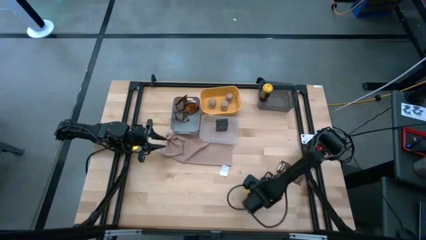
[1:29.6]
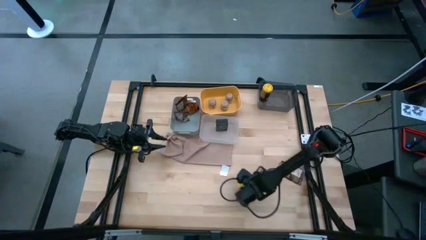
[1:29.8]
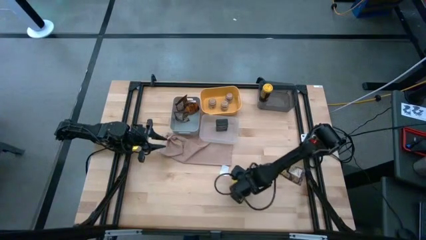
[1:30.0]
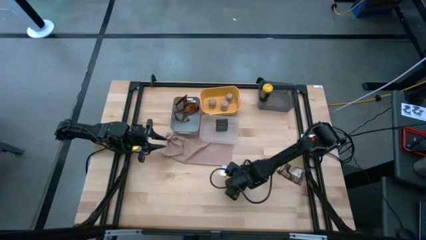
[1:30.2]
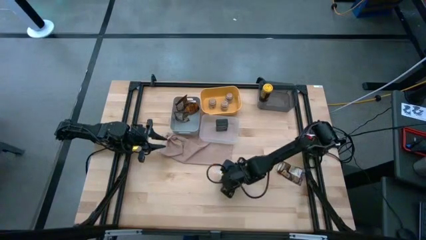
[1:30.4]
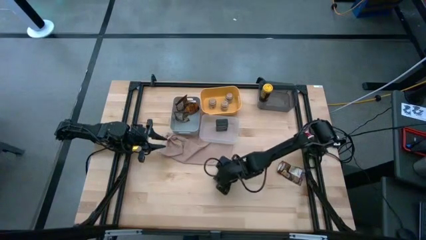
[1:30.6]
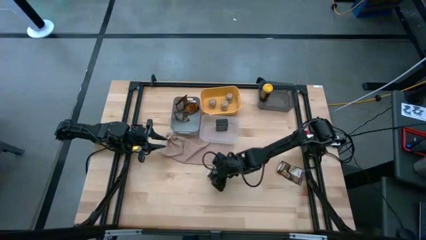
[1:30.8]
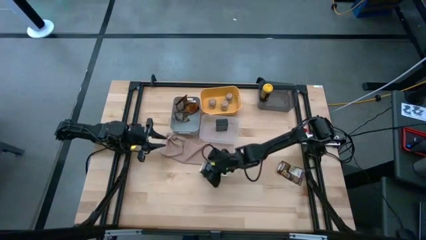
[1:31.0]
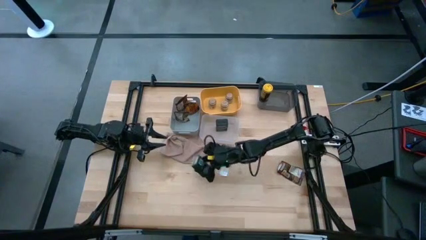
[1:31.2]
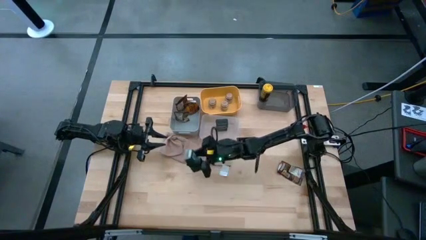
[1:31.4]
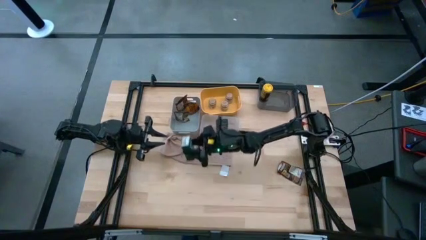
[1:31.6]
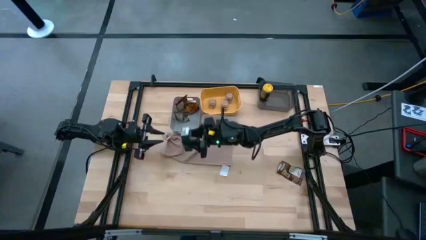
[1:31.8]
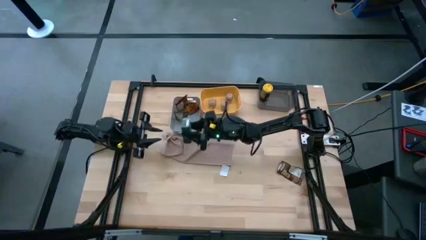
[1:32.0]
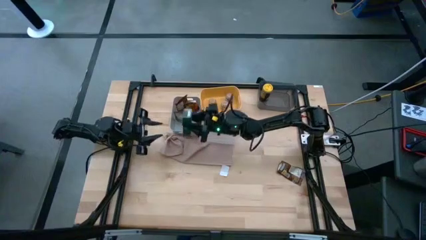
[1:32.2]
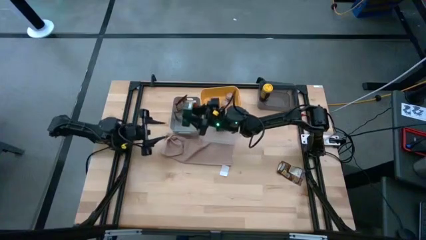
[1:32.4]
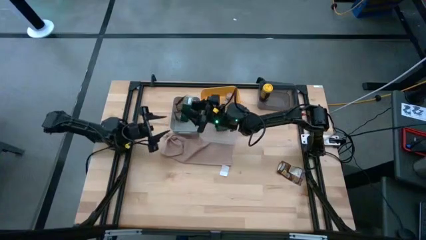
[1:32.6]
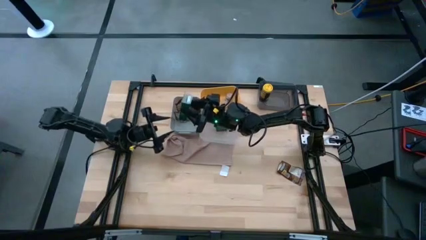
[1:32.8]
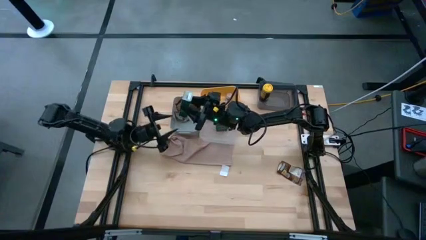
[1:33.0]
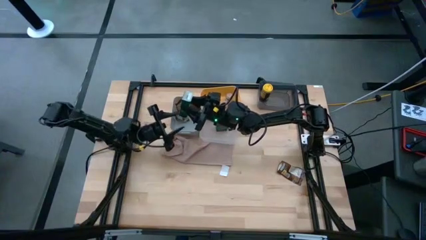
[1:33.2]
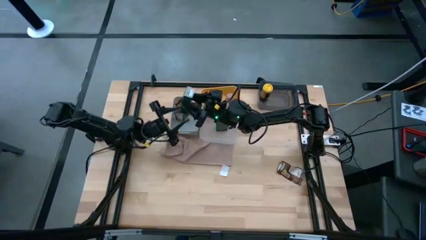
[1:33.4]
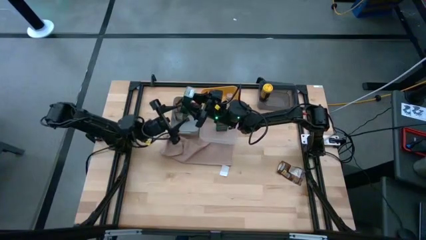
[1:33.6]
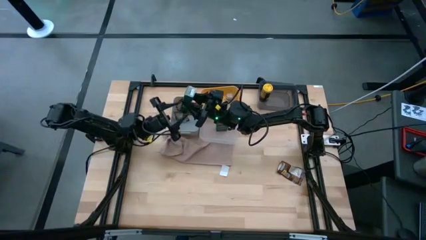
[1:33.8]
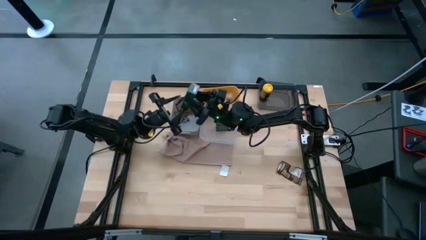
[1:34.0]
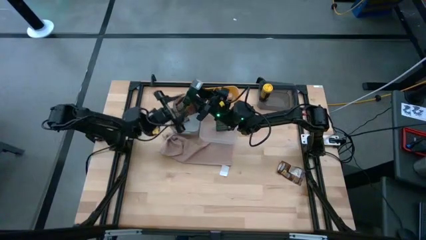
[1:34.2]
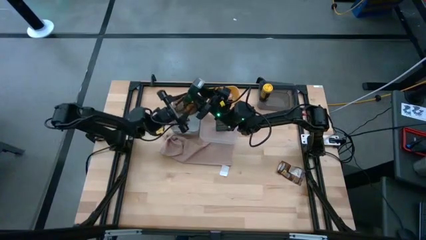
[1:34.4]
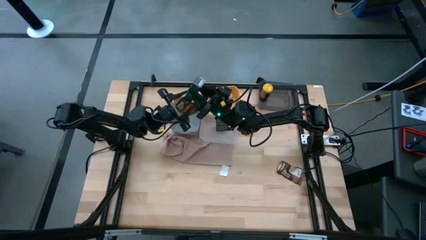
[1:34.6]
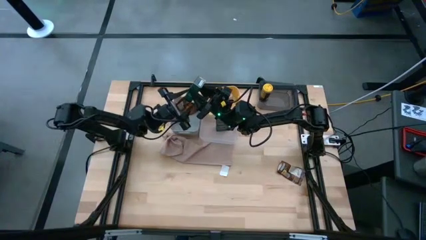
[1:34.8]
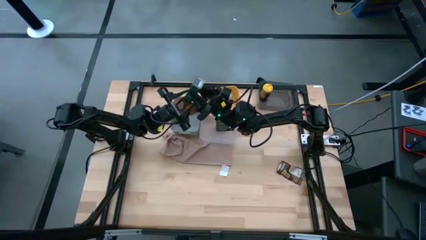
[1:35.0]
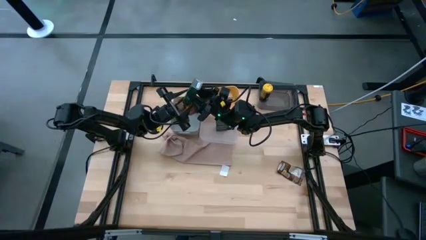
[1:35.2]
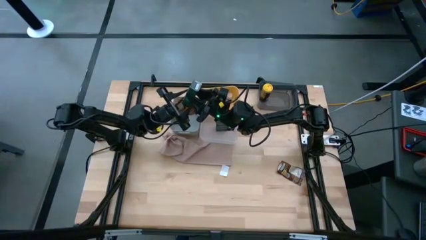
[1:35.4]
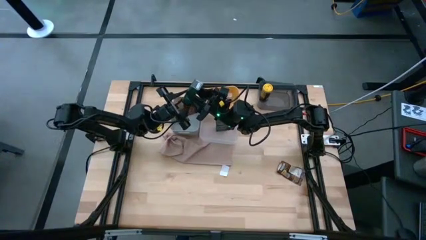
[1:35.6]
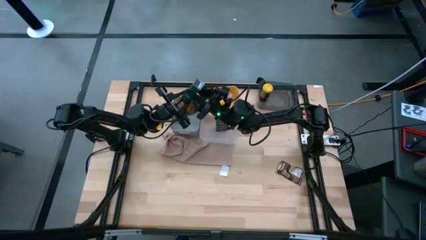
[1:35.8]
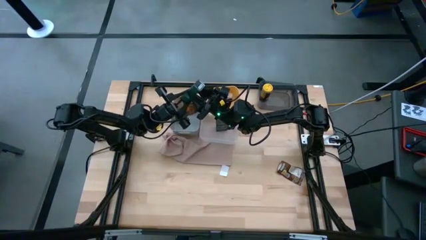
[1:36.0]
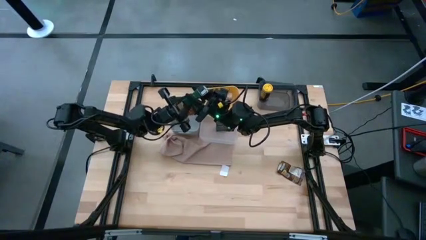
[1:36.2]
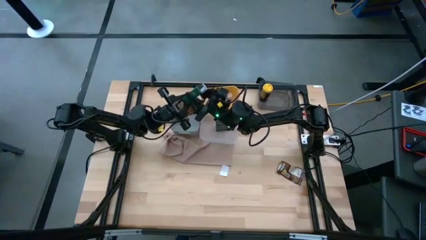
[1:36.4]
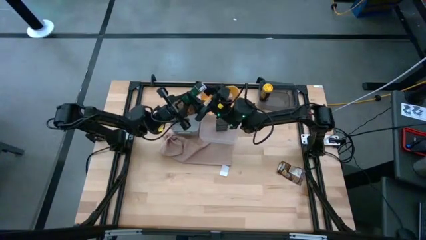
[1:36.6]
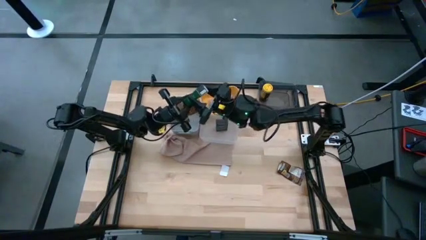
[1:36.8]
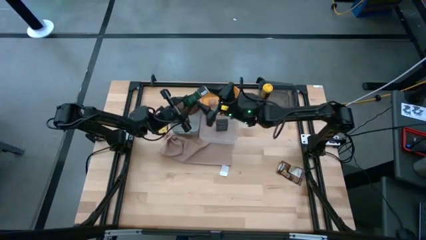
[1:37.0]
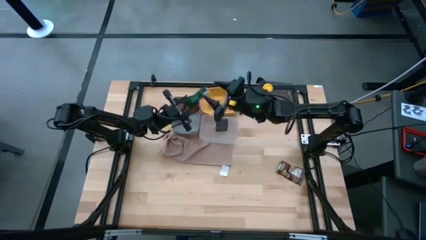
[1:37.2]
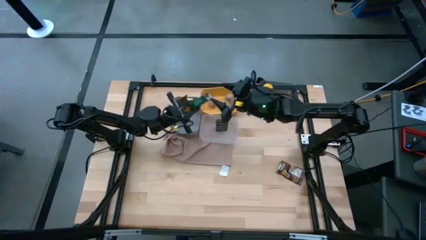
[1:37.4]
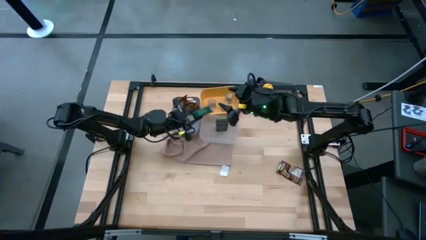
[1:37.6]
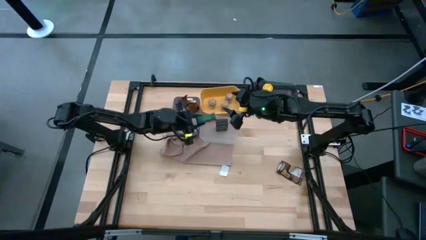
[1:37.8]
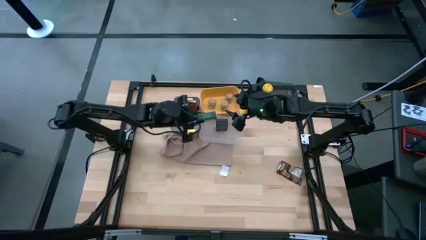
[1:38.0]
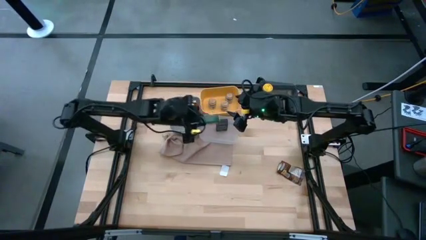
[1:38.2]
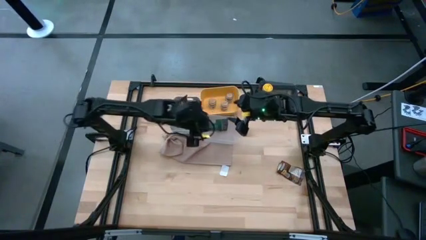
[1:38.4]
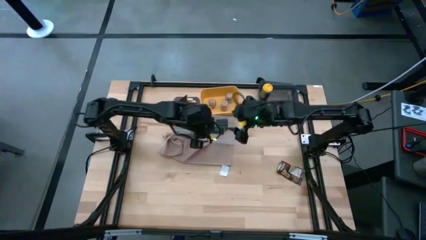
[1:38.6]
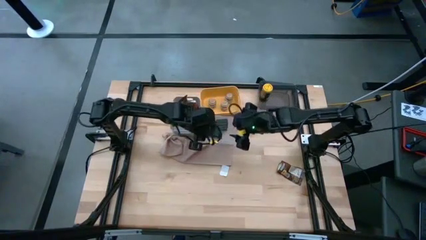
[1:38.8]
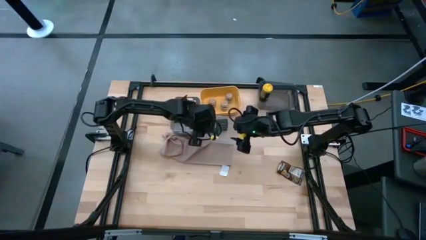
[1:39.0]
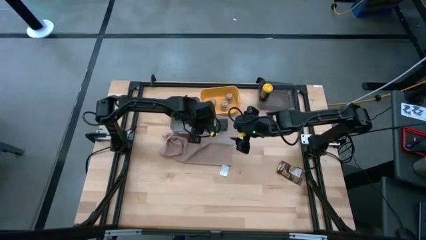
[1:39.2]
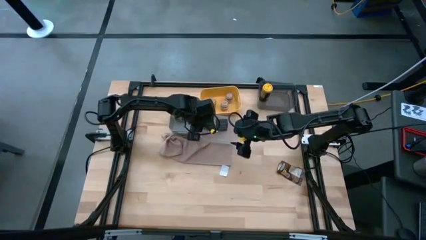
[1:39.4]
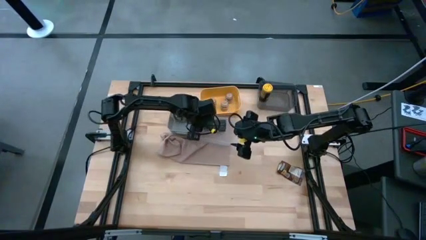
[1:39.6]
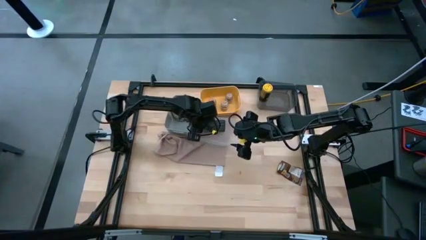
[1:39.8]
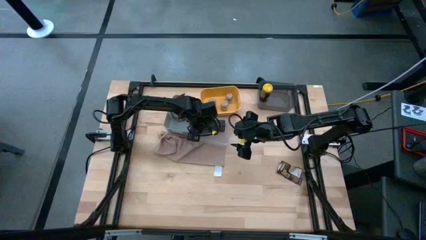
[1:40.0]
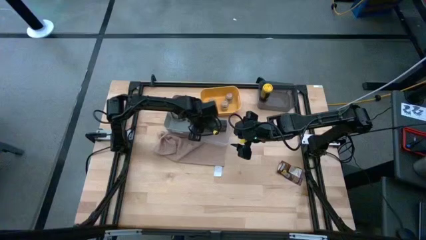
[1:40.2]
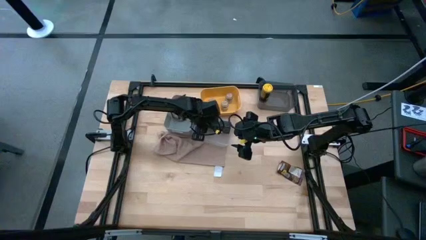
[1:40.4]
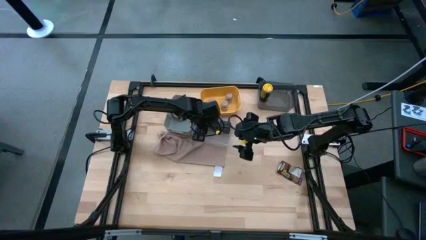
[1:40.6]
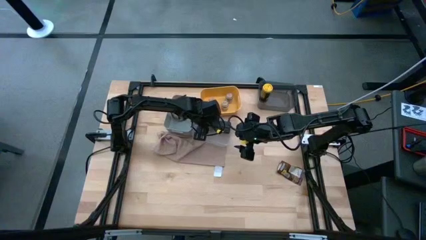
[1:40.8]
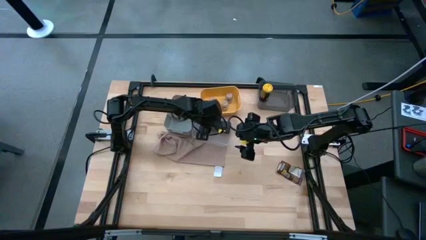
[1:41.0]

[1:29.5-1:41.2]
Task: Sort spices by type
Put the black seasoning can into the white bin

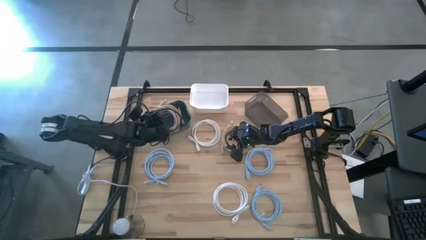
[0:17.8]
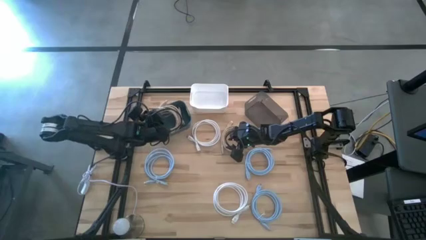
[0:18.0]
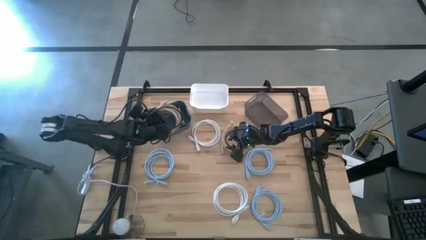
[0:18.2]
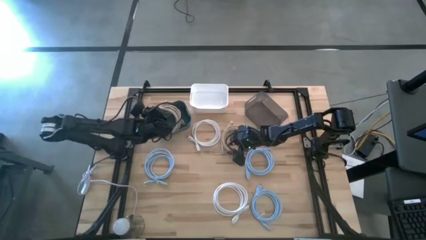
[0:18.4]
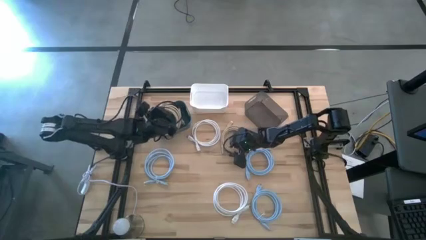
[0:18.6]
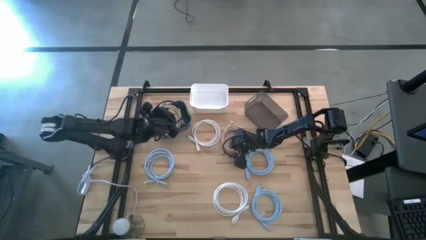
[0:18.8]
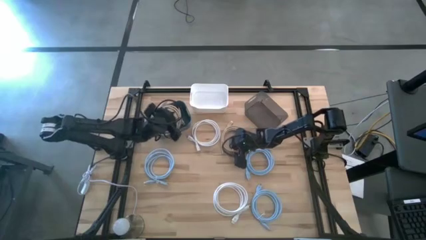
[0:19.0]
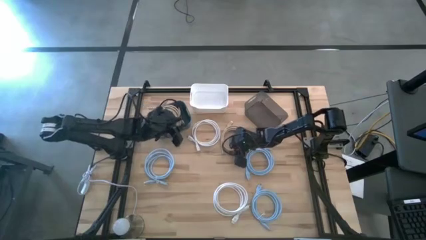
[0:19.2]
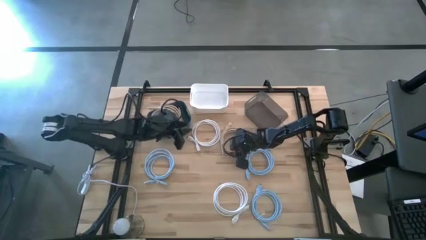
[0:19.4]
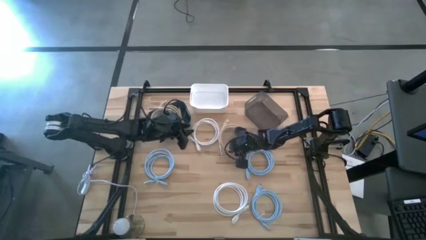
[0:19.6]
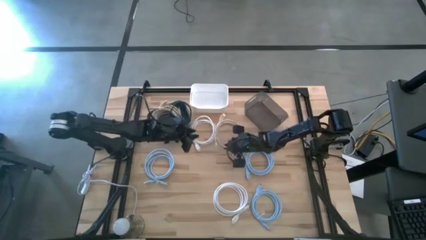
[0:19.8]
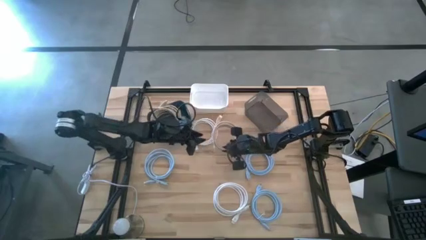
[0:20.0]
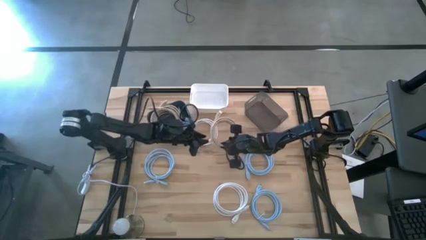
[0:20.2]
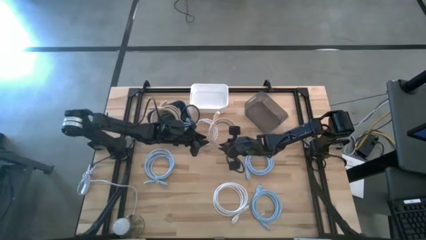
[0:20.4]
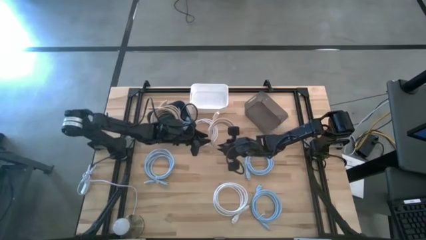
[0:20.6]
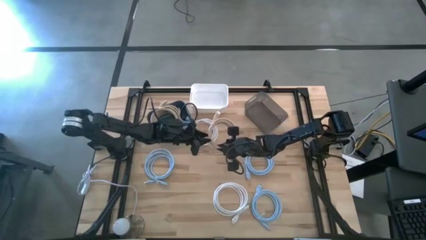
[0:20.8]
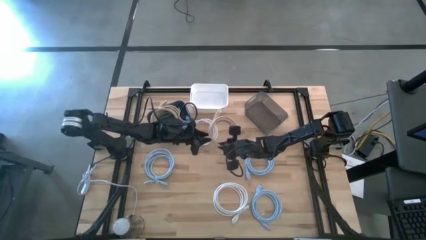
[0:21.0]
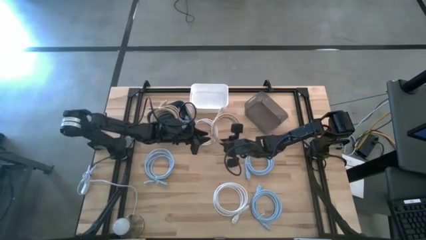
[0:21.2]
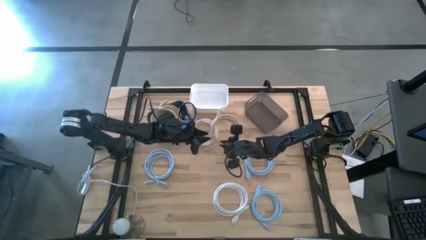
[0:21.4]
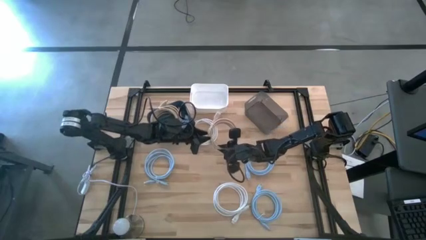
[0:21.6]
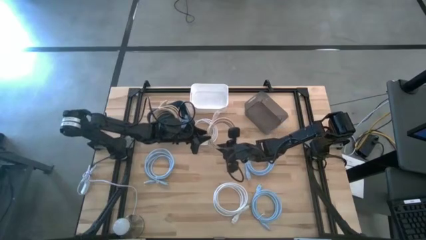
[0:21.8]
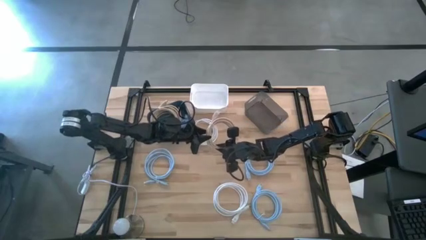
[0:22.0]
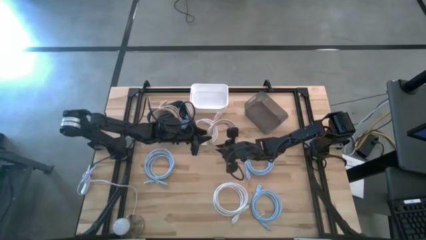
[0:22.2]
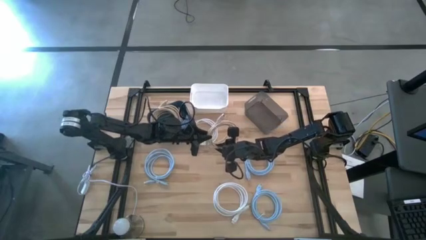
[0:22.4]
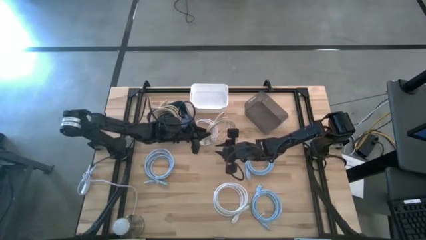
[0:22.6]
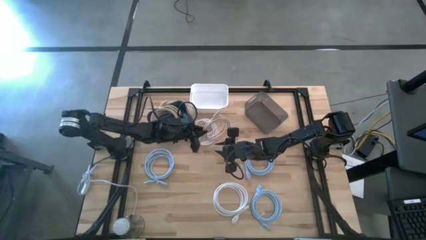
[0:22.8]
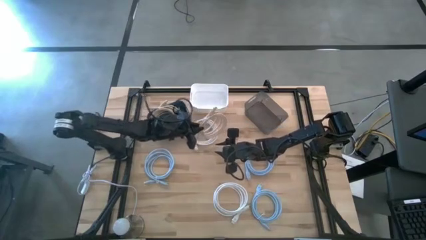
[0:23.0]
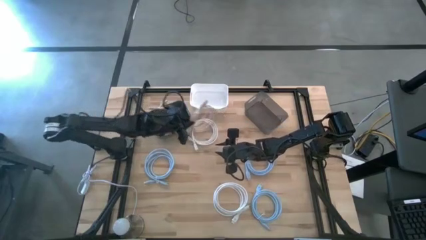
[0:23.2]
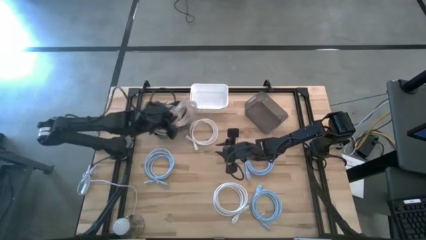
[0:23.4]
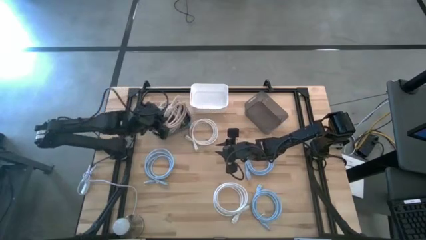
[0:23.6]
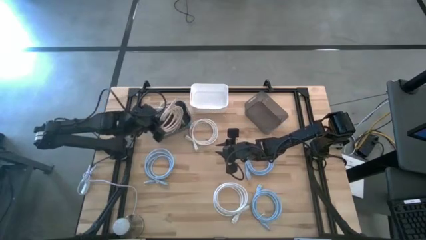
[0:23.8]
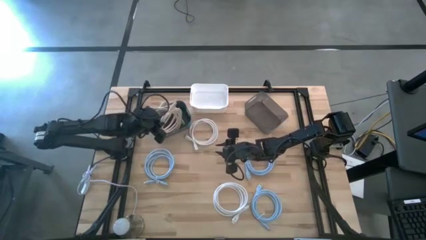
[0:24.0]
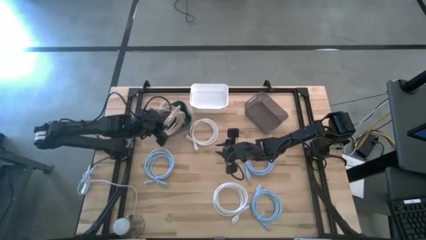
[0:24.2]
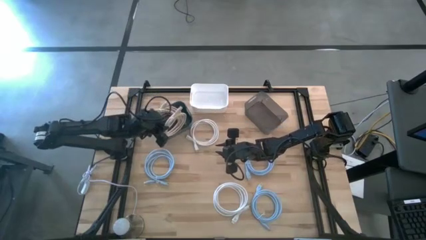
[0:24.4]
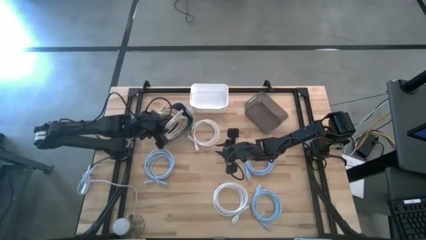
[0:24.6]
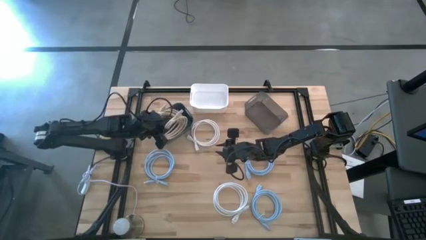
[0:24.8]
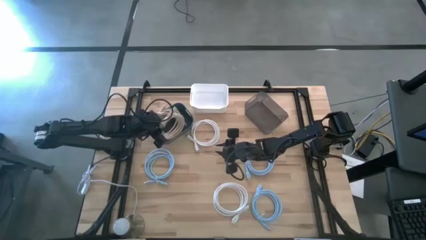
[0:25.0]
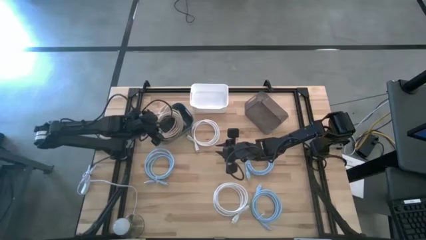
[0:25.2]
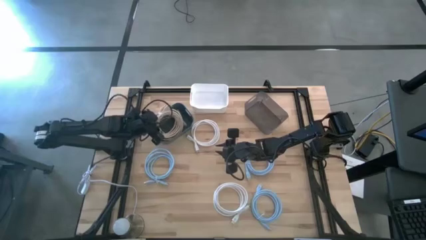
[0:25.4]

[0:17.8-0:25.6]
Task: Sort HDMI cables
Put the light brown HDMI cable into the blue bin
